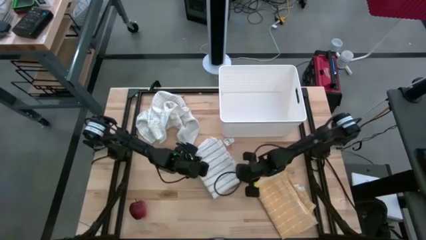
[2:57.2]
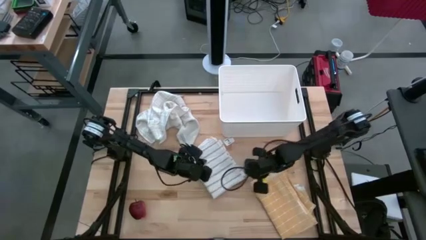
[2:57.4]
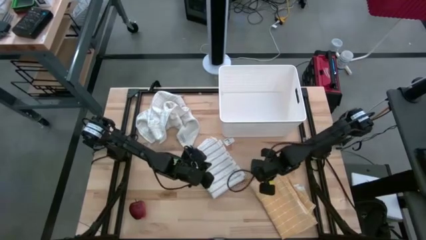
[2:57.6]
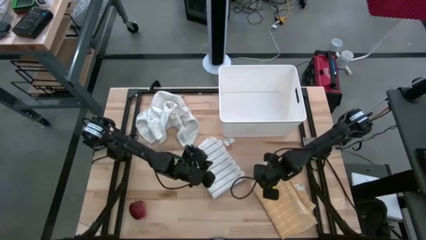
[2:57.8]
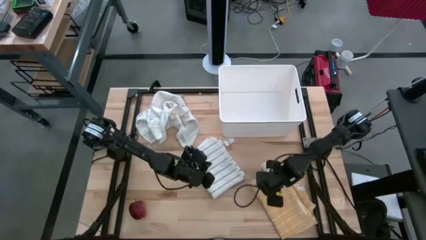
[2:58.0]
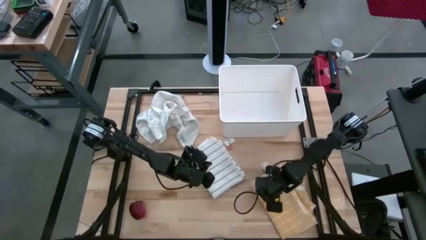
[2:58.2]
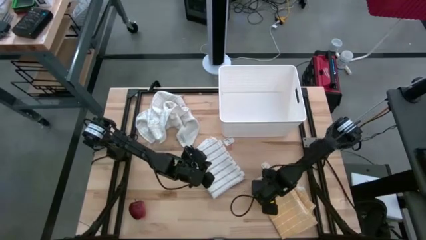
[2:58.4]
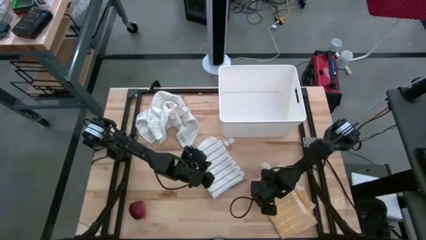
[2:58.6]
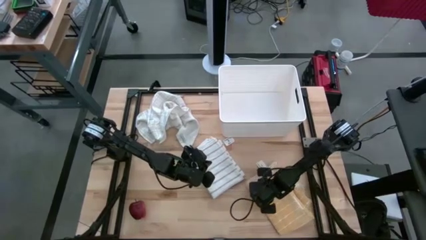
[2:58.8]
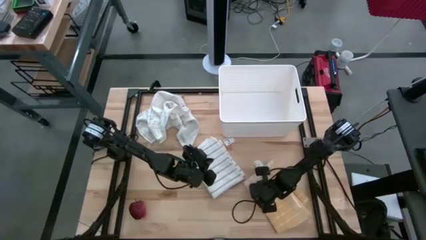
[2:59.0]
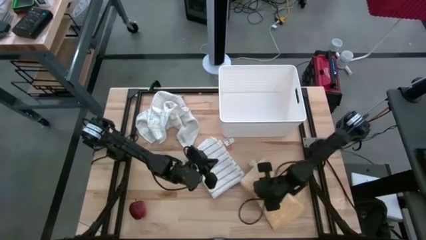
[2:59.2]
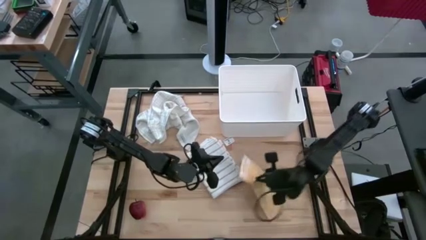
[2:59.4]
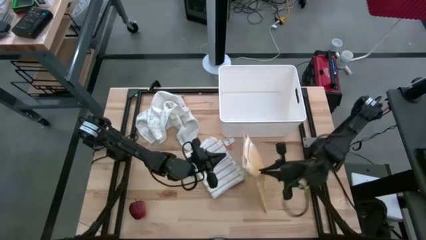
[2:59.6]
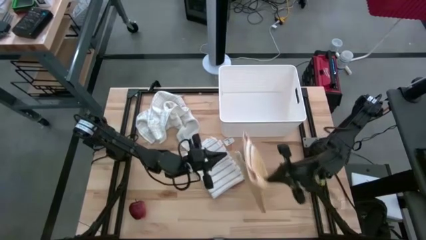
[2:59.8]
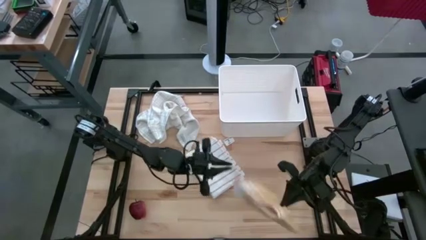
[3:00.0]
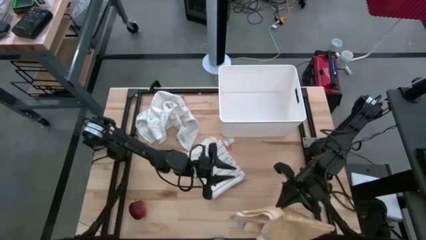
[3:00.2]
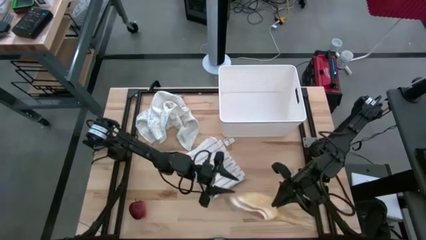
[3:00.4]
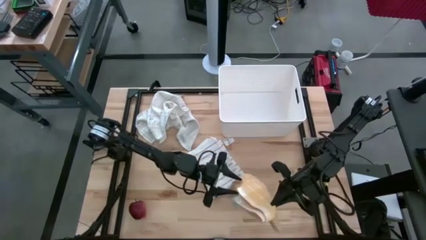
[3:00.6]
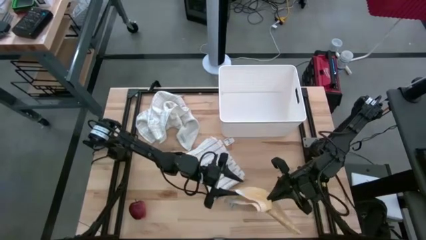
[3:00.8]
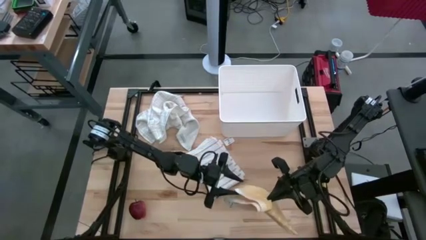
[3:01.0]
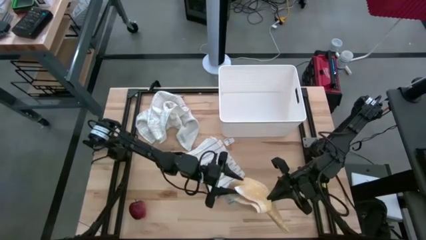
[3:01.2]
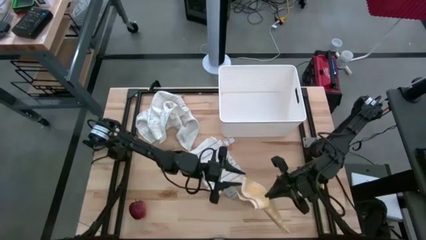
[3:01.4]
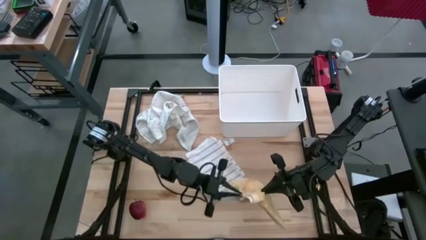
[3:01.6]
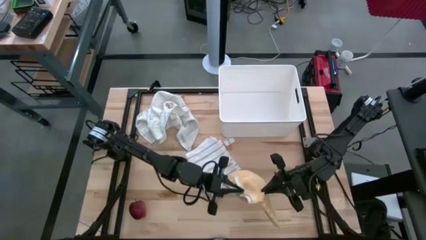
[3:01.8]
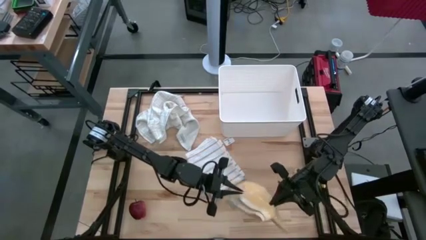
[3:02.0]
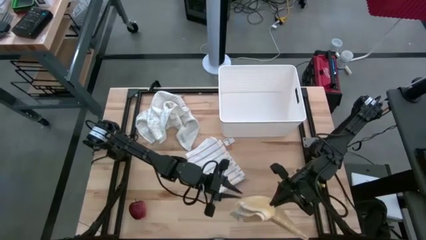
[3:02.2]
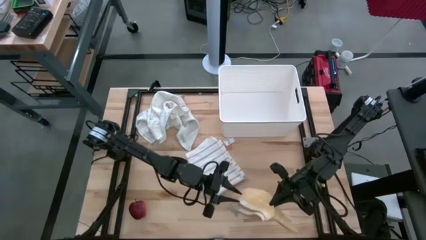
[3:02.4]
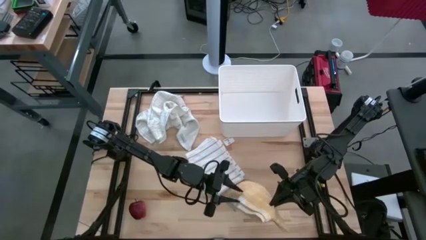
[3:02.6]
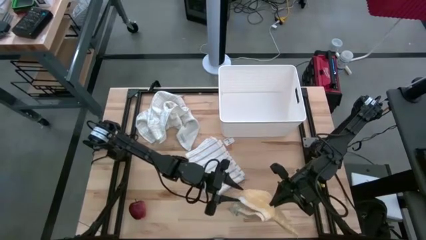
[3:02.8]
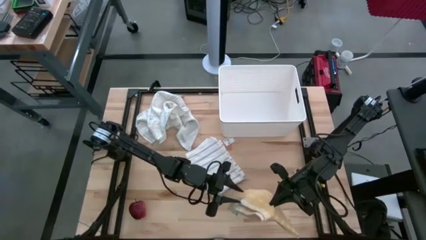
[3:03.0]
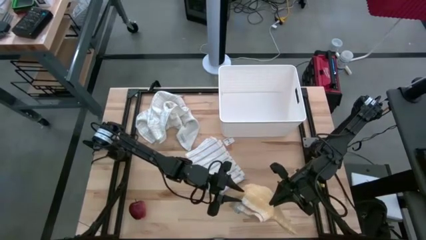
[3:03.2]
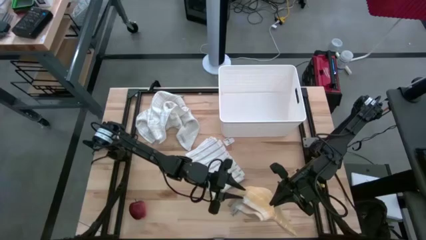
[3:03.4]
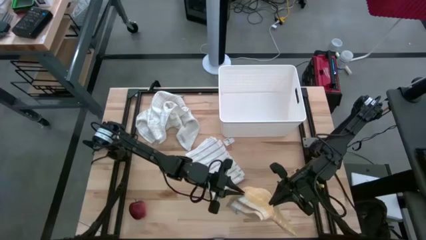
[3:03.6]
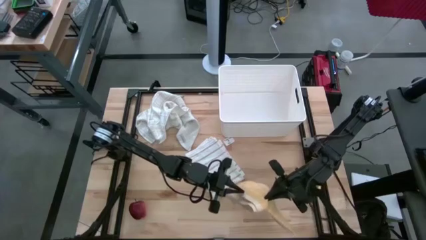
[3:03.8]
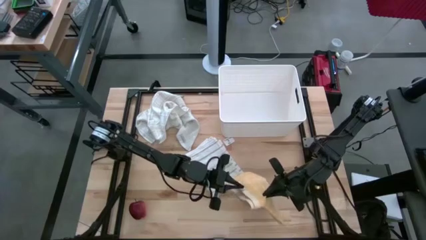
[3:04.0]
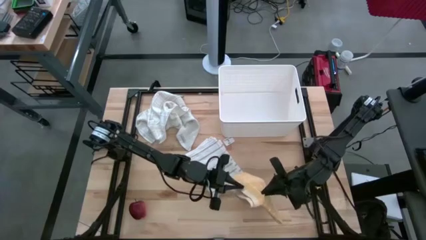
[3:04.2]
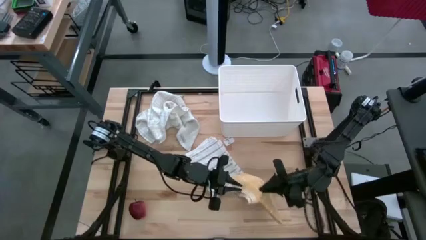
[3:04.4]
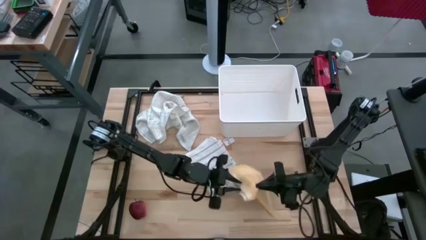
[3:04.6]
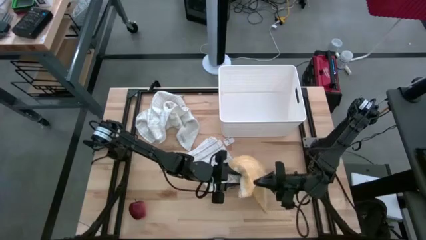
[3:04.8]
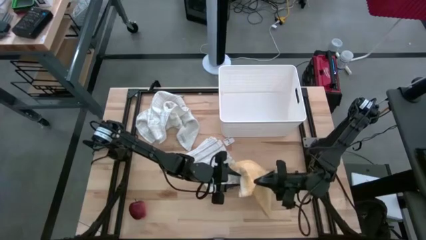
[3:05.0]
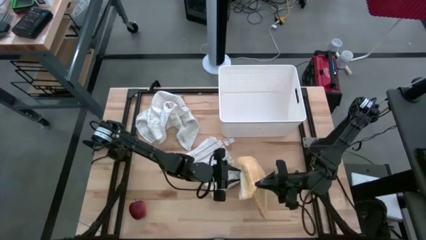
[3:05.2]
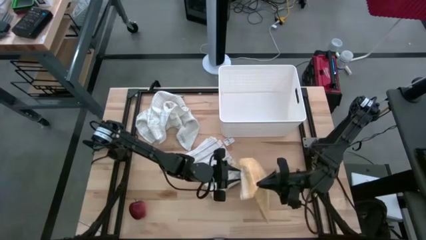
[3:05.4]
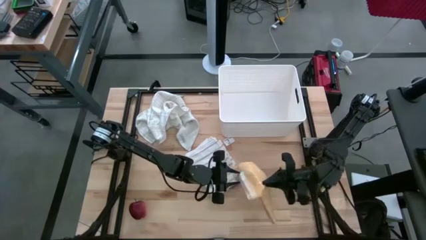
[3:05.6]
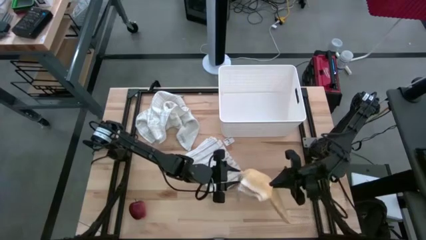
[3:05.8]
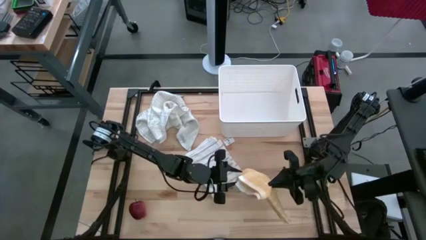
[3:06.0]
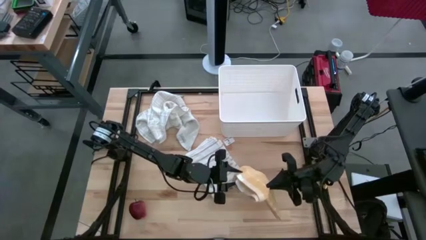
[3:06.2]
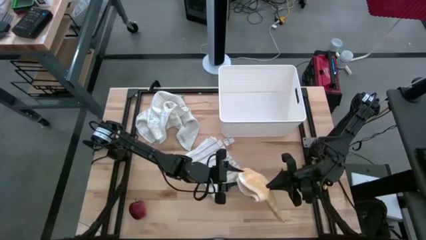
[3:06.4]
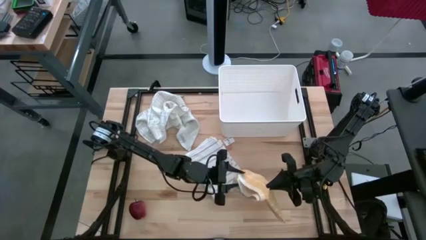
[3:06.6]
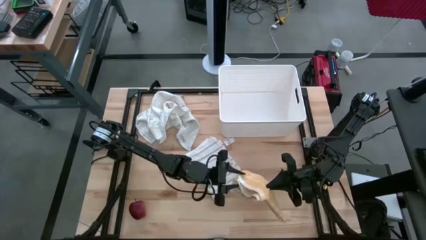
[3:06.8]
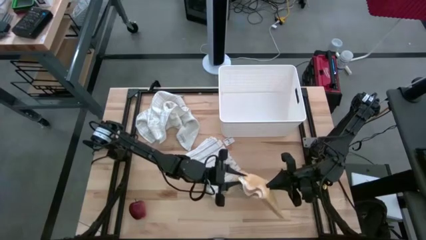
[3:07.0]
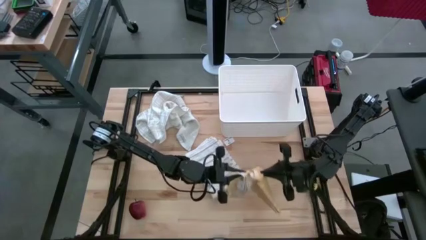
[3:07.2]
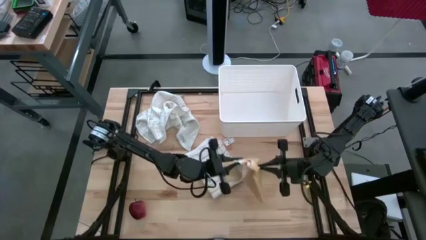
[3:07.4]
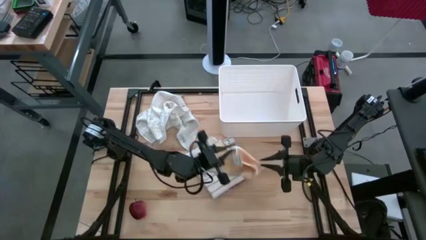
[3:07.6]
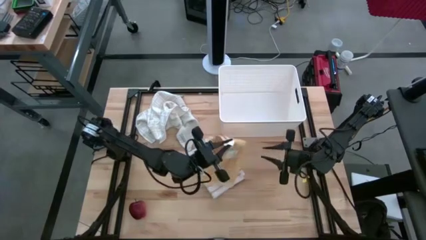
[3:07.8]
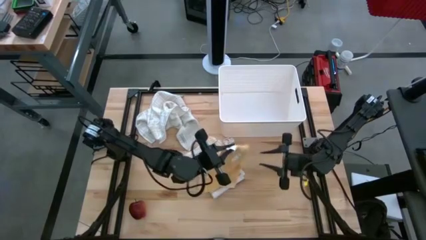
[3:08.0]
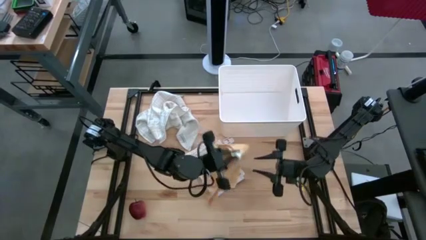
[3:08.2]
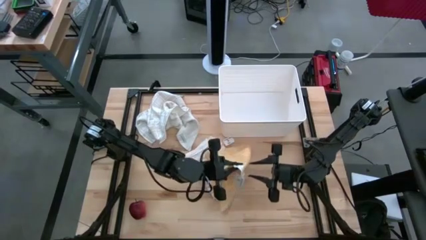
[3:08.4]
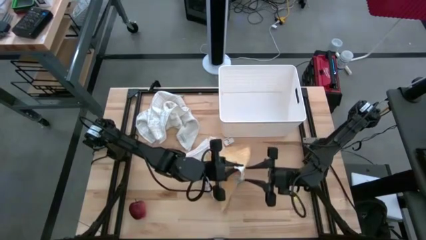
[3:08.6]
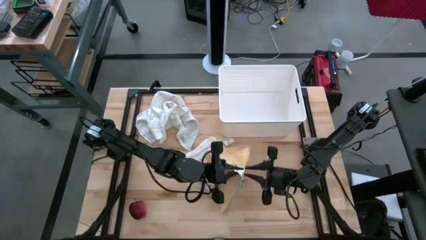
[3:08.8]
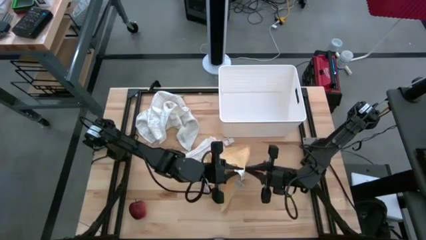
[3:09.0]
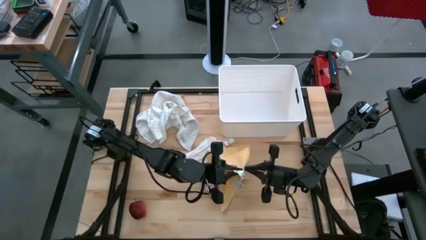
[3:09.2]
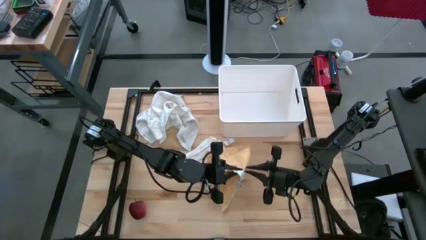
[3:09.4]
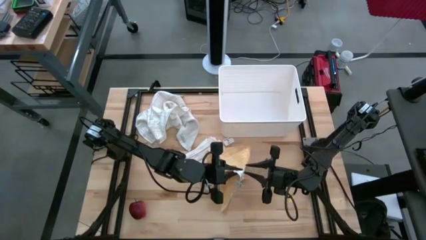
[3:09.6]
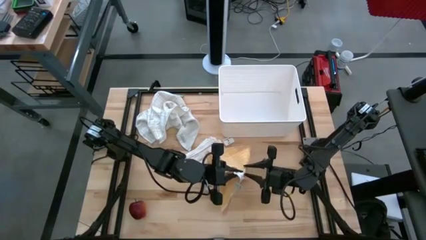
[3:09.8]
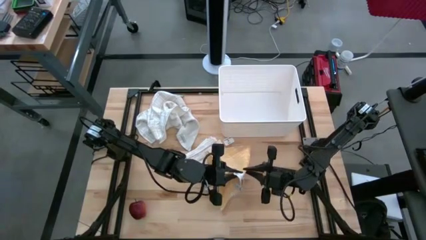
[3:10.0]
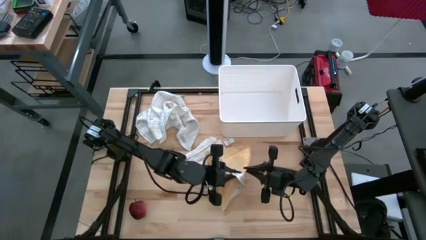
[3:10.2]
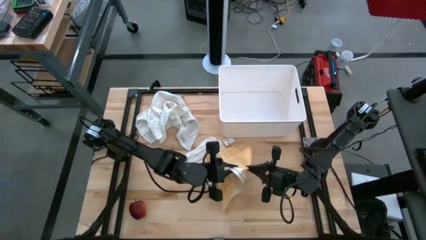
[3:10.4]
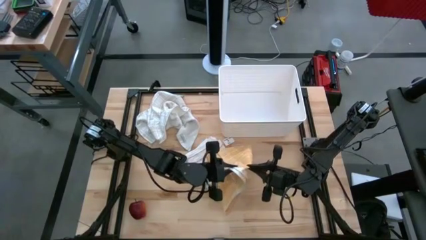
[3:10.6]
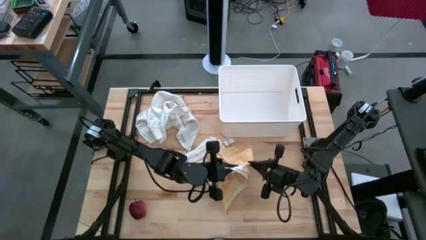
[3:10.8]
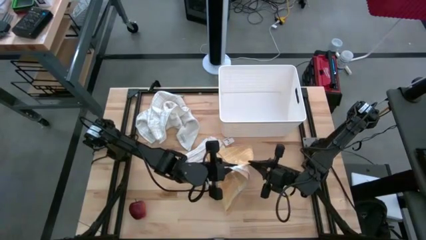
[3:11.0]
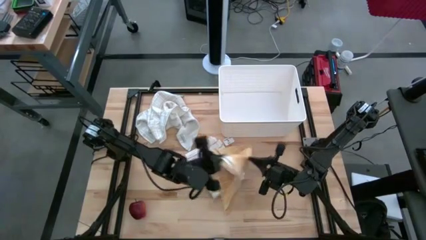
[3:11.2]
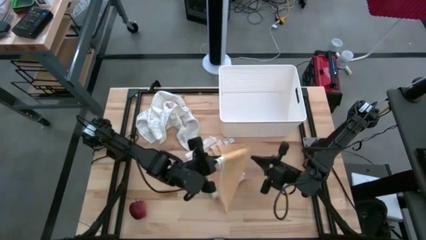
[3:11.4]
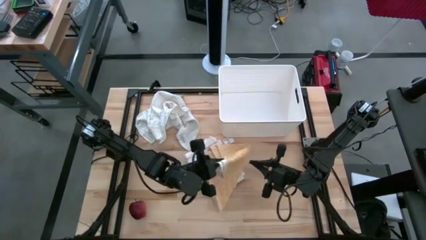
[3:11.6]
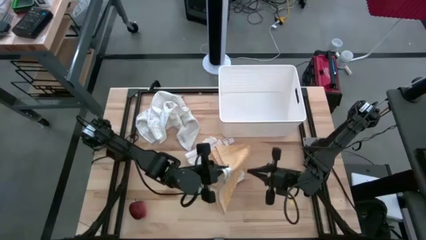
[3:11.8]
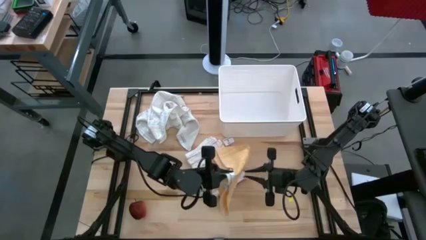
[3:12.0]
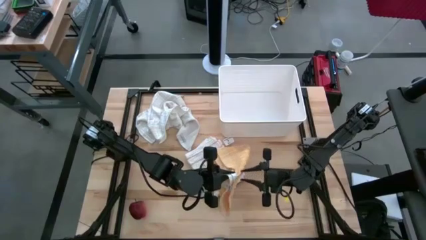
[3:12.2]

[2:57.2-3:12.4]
Task: Fold towel
Fold the yellow squared towel

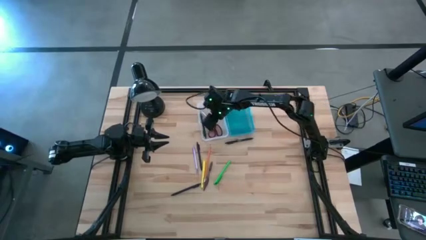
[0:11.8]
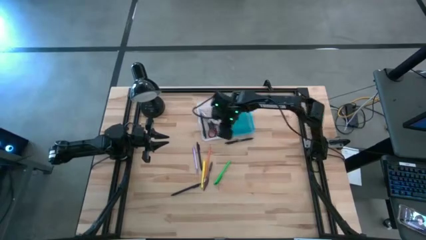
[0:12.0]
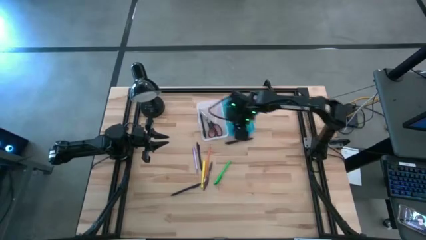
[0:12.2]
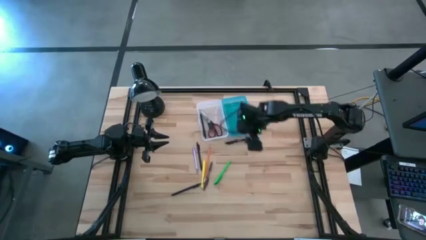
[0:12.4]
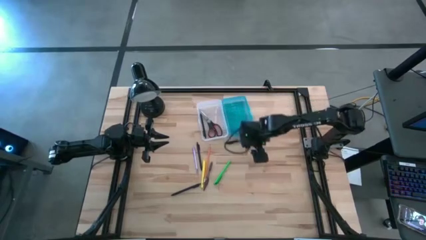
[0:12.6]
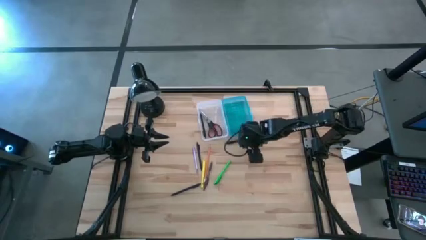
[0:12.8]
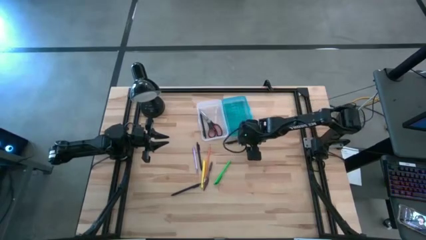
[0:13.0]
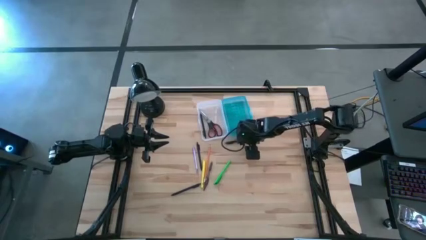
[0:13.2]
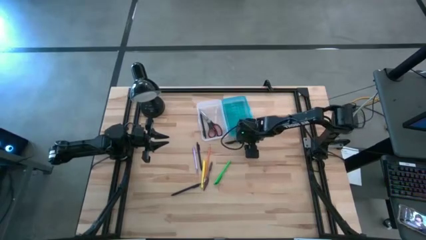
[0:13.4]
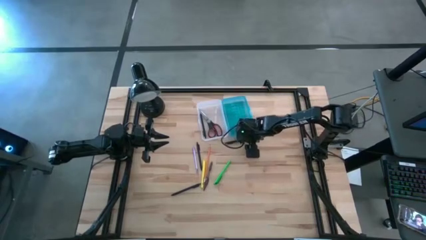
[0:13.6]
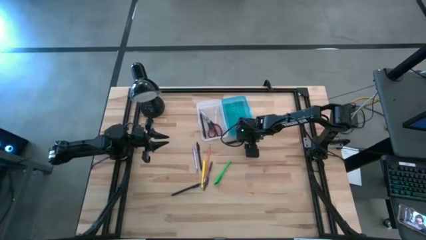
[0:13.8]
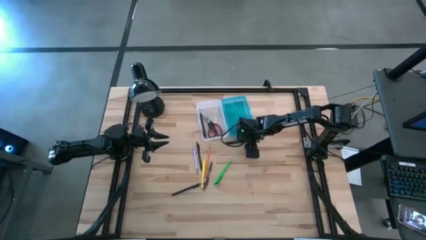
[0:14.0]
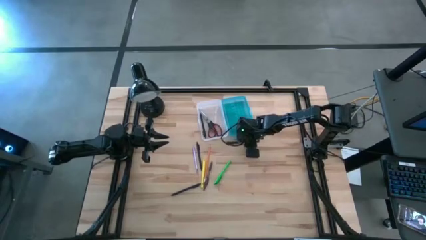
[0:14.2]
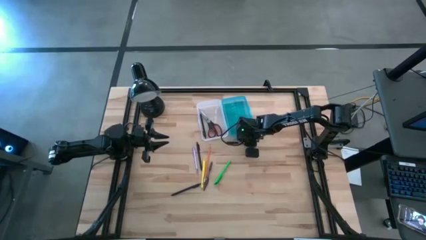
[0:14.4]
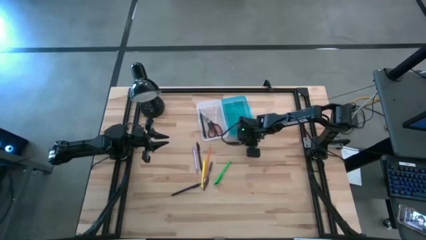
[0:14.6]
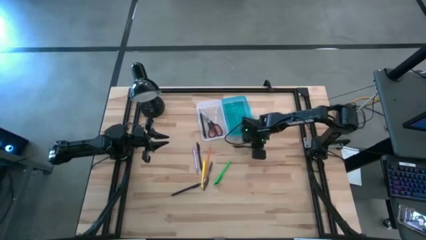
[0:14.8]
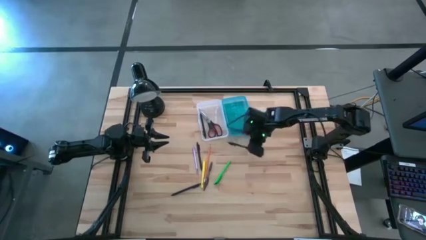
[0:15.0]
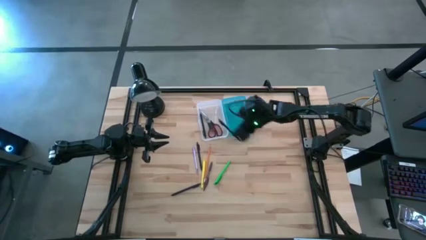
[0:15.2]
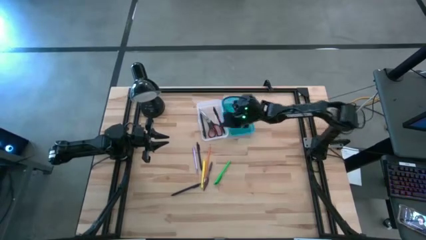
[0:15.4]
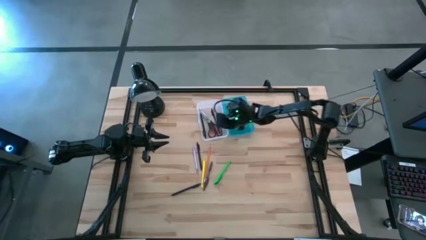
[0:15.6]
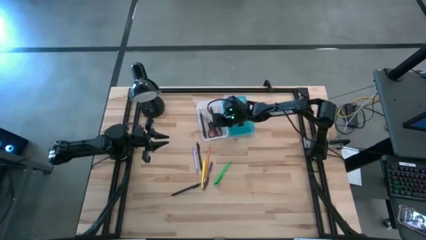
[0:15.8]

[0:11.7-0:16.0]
Task: Pick & place school supplies into a supply box
Put the black pen into the blue supply box
